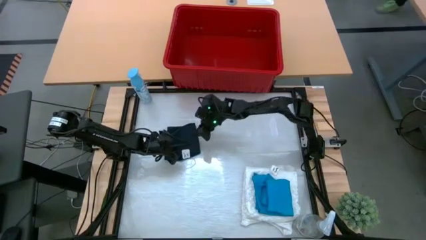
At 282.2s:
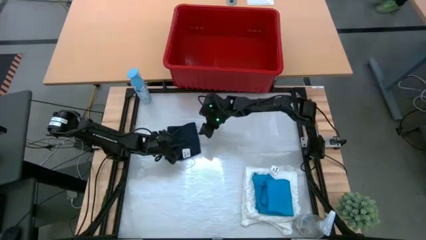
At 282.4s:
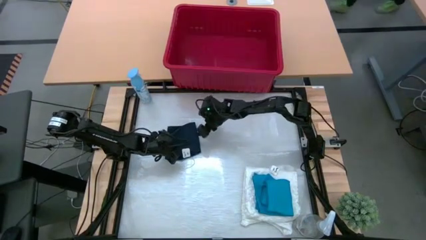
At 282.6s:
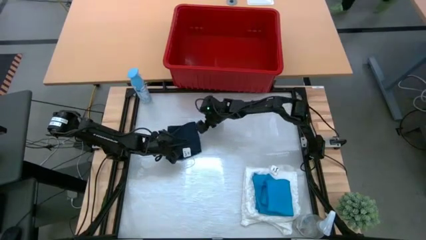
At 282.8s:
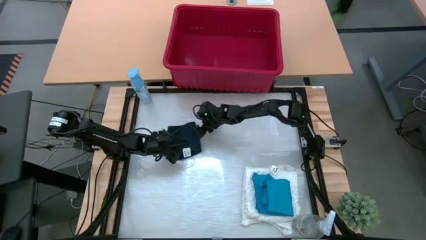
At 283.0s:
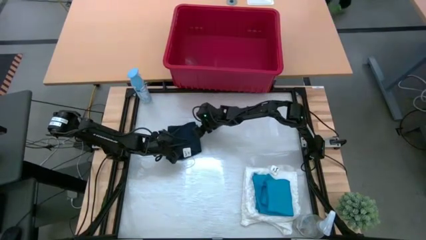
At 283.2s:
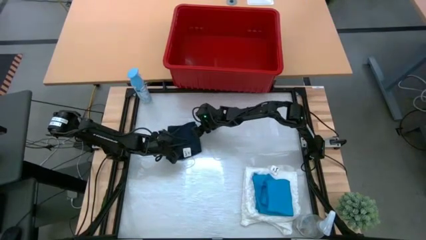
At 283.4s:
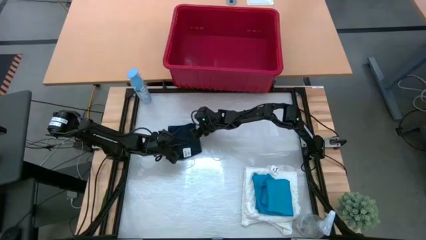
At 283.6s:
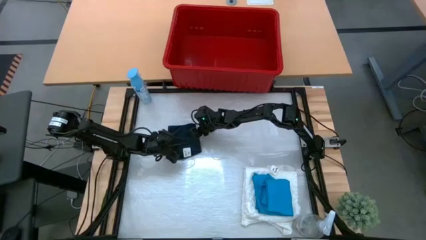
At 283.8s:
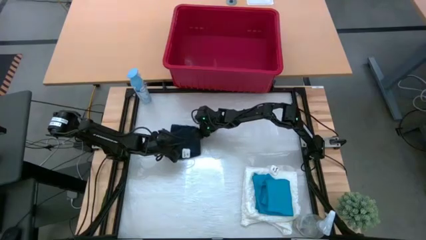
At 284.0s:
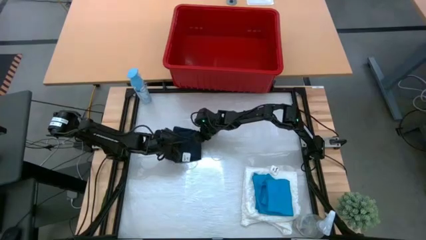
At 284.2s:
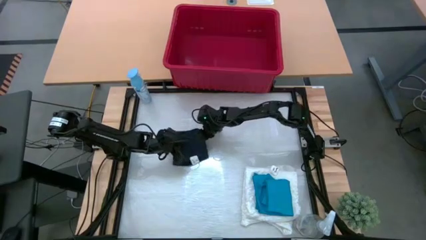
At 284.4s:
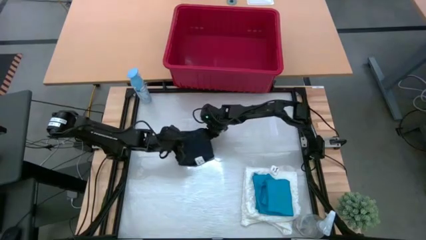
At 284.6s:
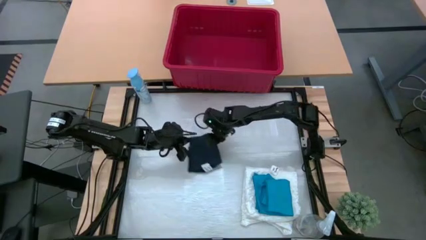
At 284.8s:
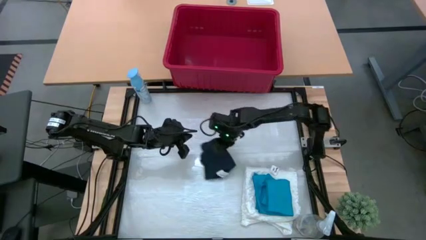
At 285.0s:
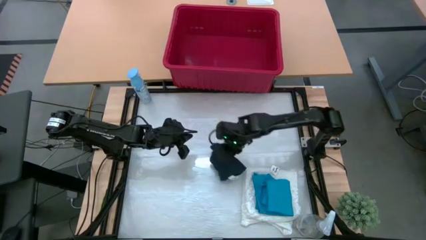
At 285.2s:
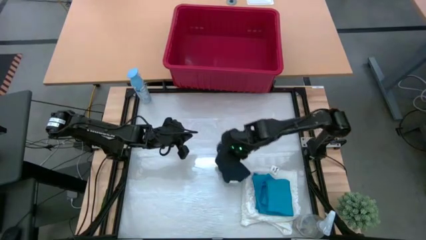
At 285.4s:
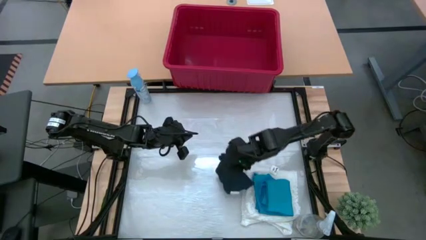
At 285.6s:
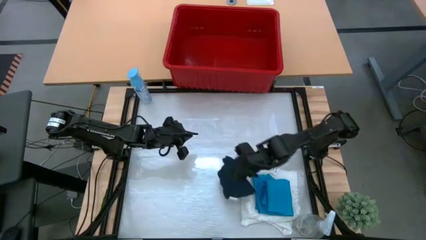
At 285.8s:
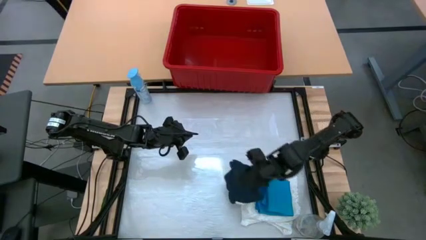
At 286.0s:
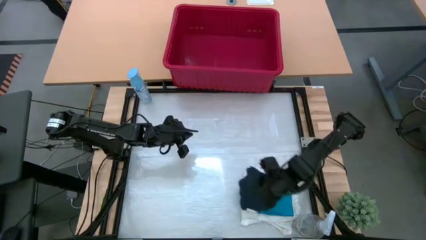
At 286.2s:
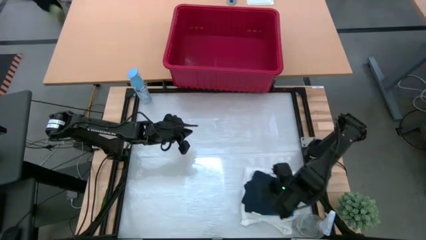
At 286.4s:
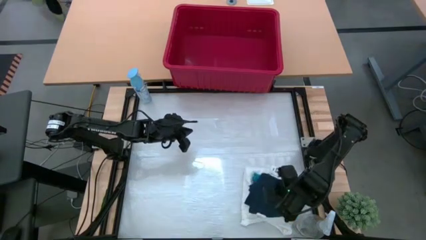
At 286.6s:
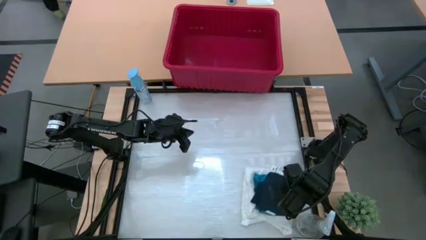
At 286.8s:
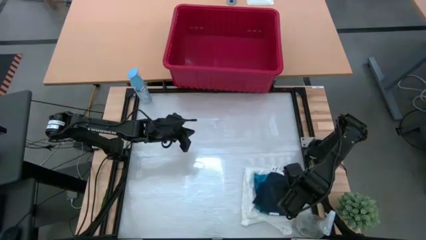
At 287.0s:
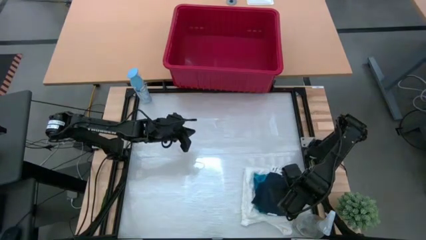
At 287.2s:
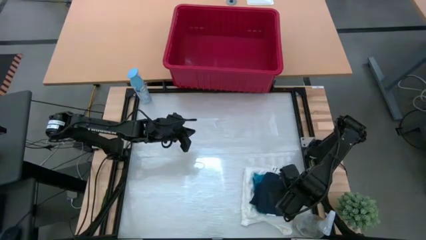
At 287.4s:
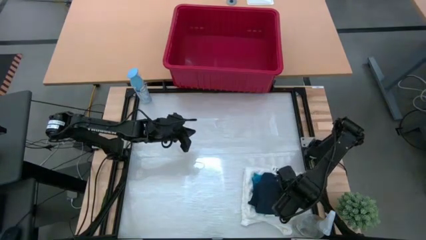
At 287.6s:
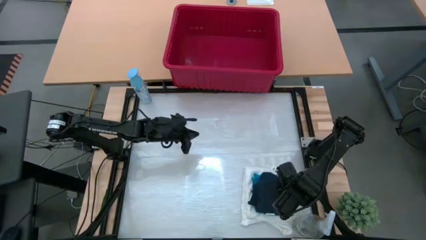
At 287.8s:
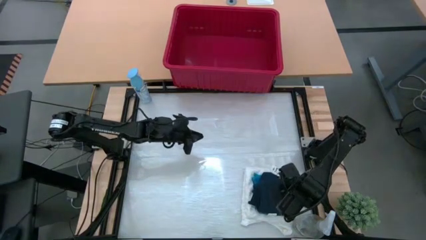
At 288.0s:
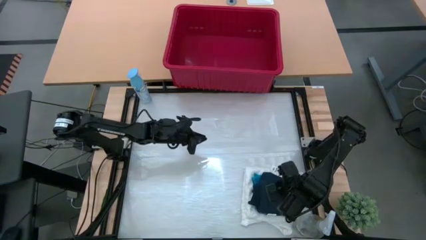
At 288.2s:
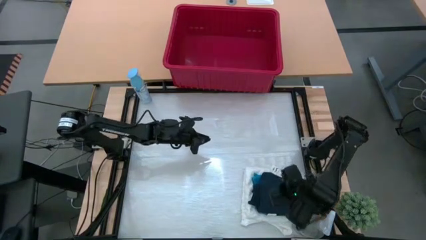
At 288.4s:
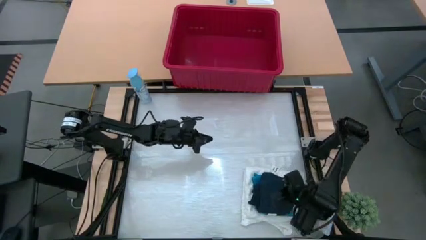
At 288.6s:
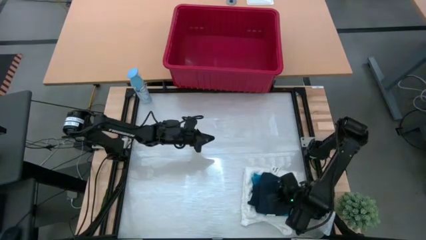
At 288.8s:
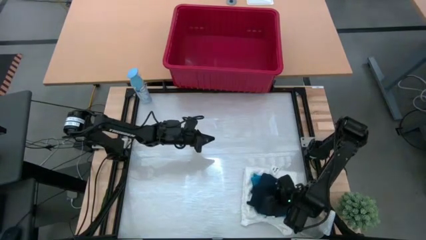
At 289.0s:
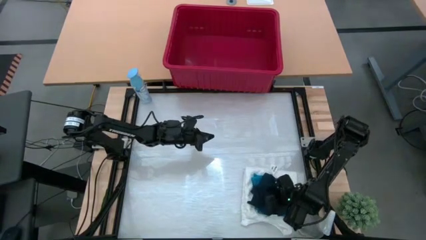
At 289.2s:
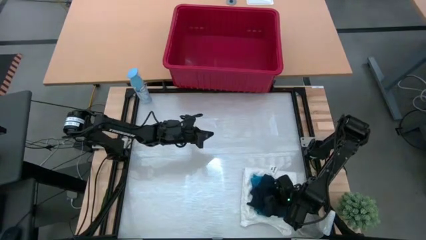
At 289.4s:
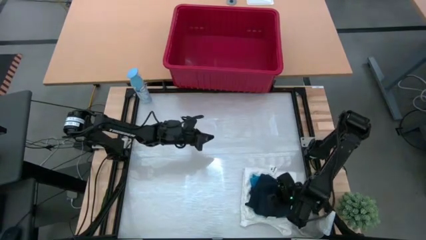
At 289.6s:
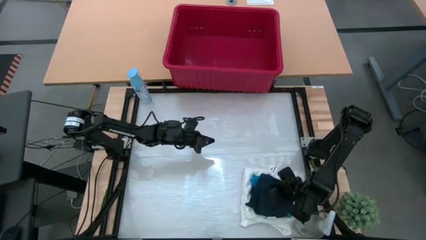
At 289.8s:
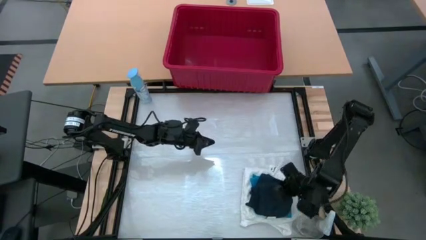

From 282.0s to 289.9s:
Task: Fold laundry
Stack the folded dark blue shorts on top of the folded blue shorts

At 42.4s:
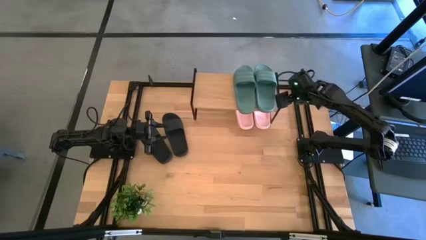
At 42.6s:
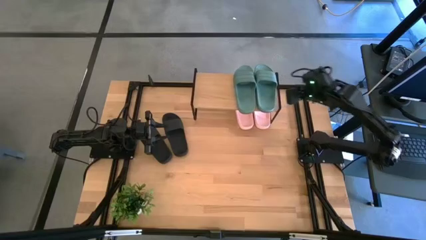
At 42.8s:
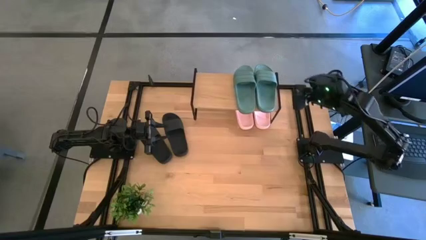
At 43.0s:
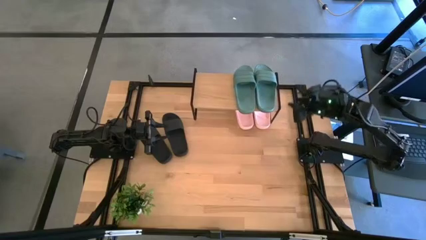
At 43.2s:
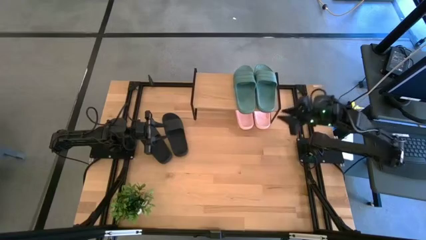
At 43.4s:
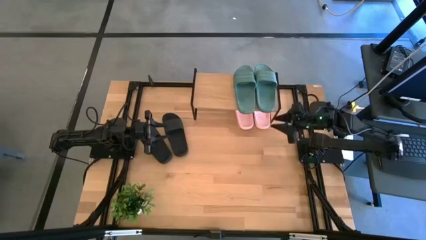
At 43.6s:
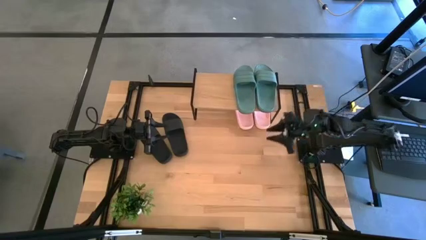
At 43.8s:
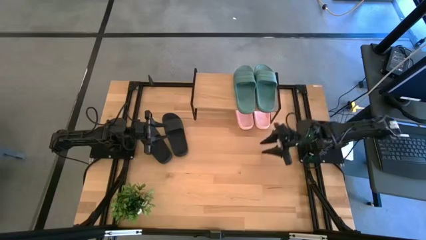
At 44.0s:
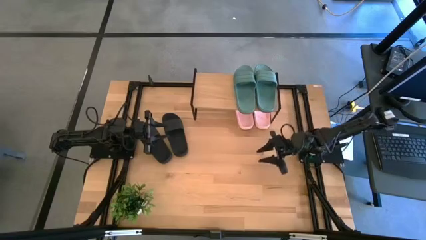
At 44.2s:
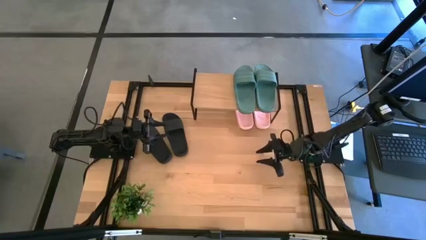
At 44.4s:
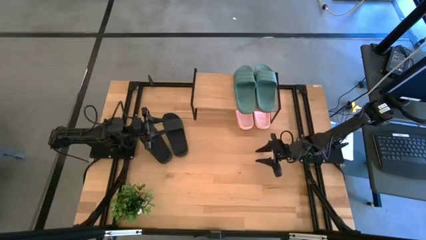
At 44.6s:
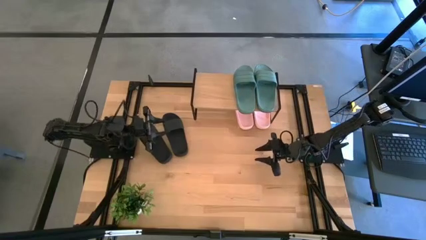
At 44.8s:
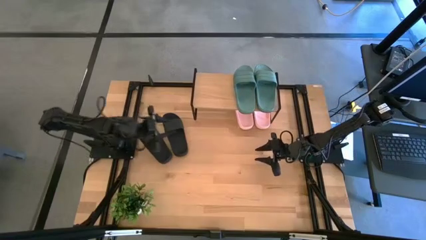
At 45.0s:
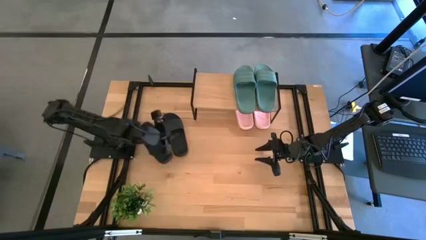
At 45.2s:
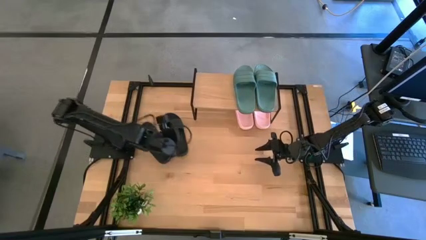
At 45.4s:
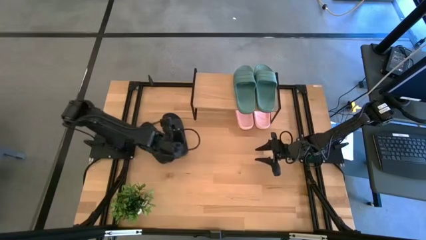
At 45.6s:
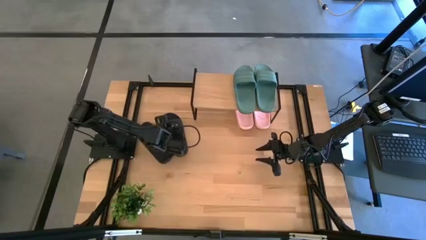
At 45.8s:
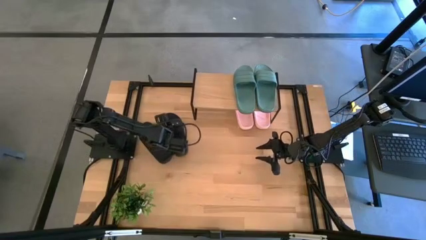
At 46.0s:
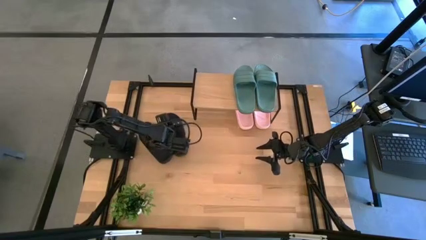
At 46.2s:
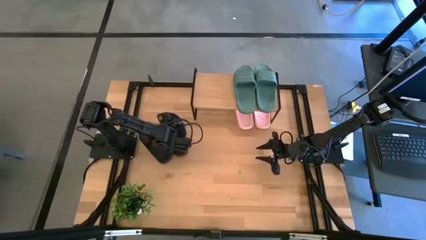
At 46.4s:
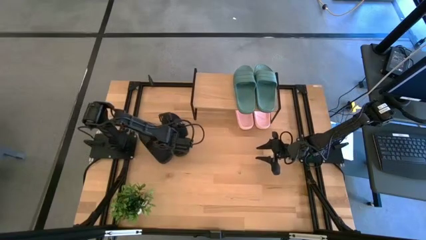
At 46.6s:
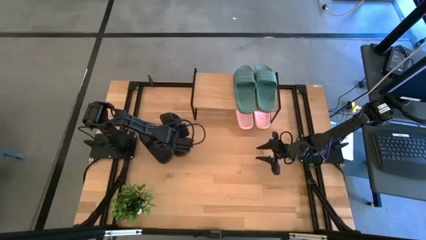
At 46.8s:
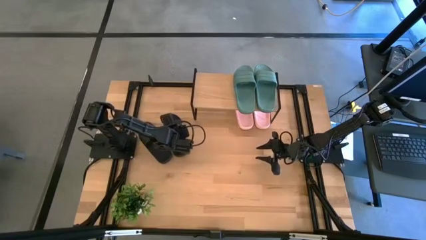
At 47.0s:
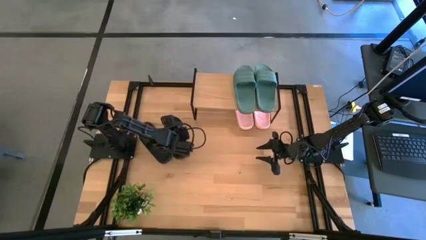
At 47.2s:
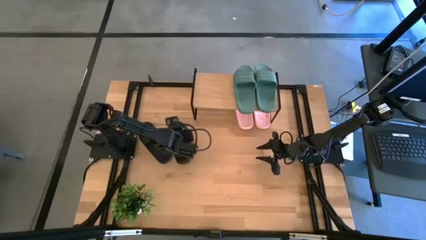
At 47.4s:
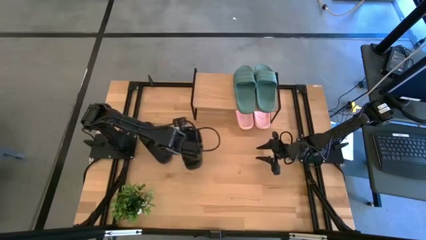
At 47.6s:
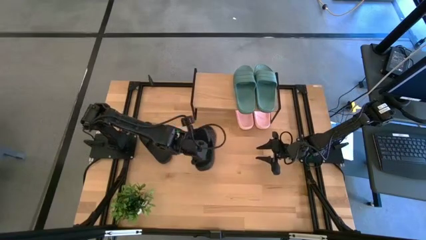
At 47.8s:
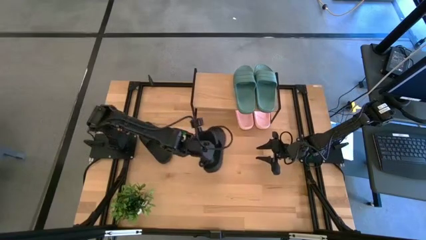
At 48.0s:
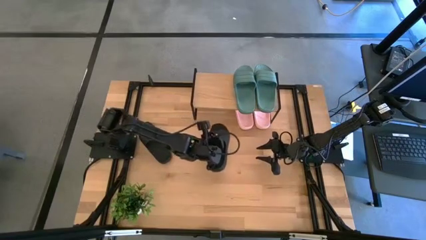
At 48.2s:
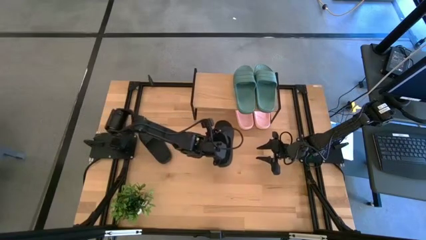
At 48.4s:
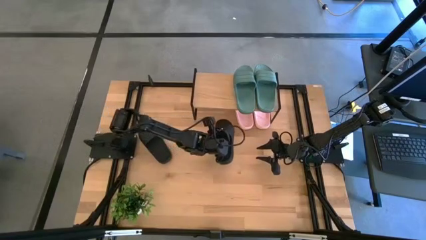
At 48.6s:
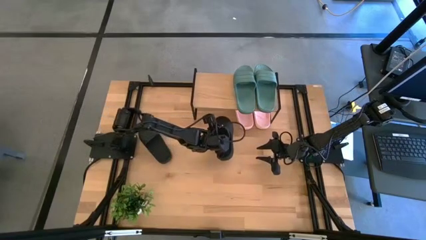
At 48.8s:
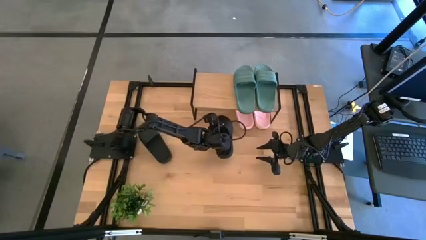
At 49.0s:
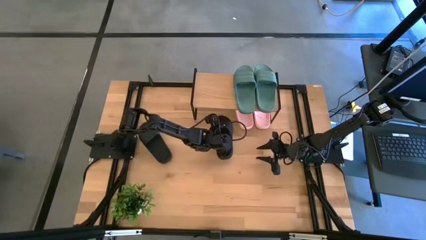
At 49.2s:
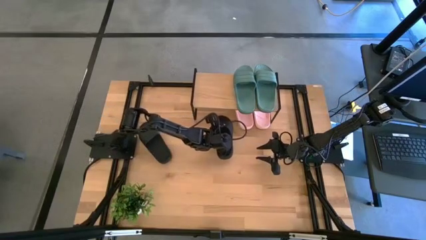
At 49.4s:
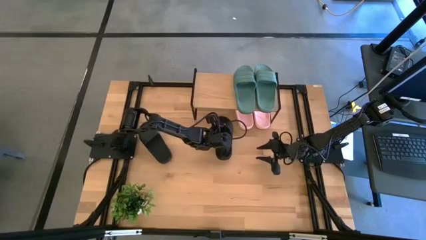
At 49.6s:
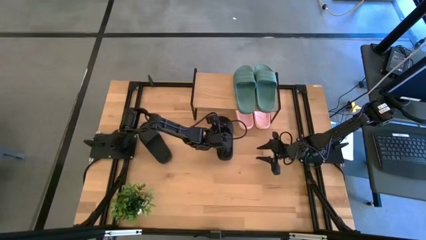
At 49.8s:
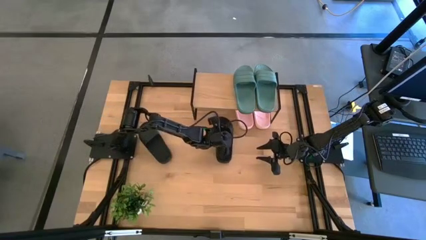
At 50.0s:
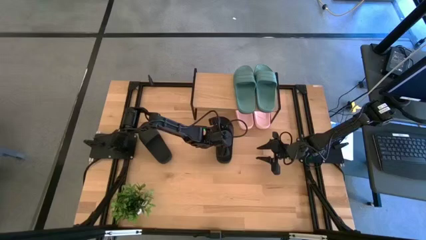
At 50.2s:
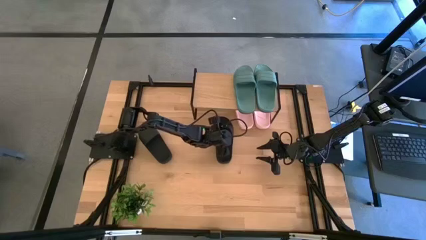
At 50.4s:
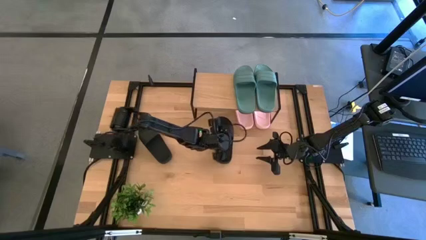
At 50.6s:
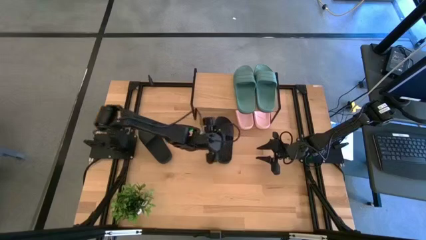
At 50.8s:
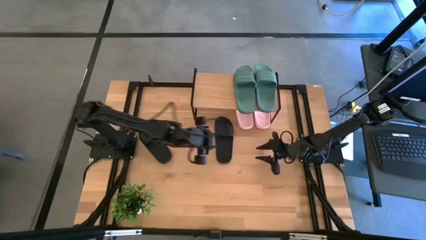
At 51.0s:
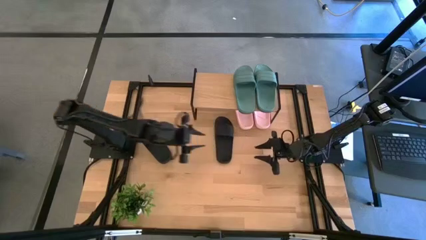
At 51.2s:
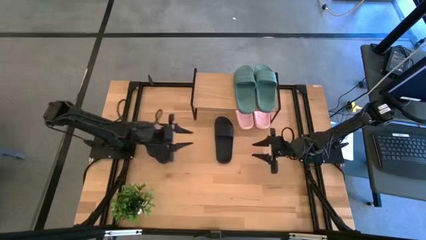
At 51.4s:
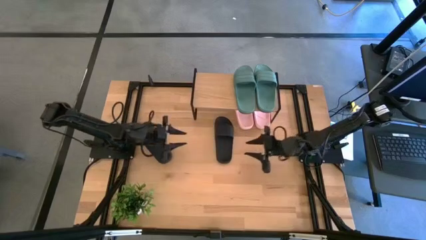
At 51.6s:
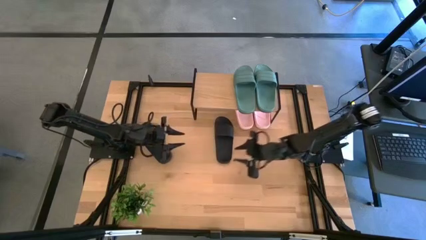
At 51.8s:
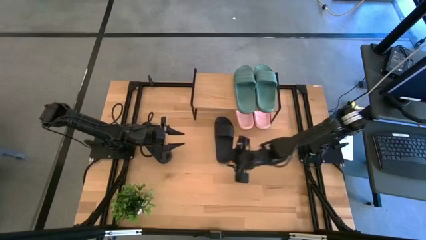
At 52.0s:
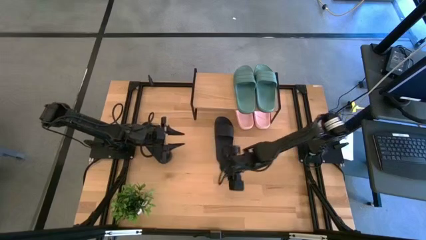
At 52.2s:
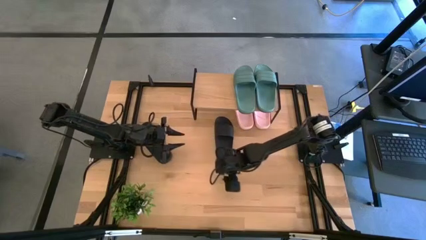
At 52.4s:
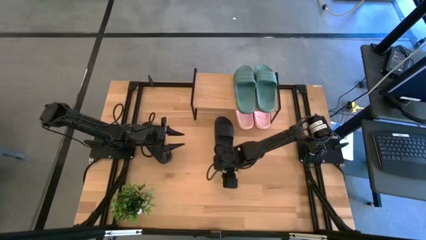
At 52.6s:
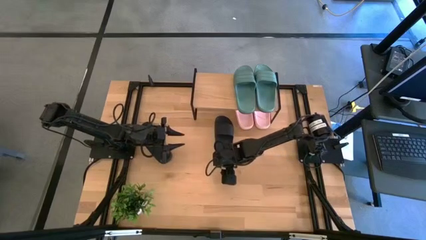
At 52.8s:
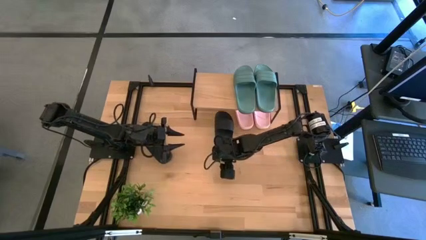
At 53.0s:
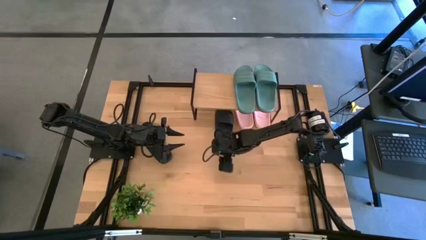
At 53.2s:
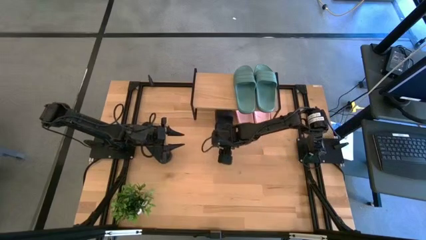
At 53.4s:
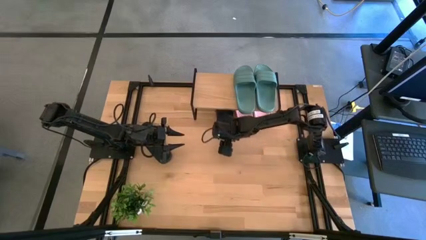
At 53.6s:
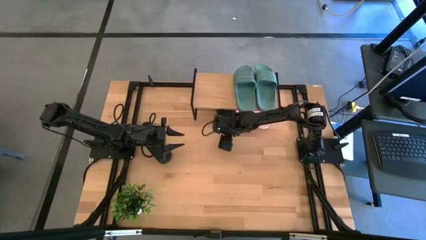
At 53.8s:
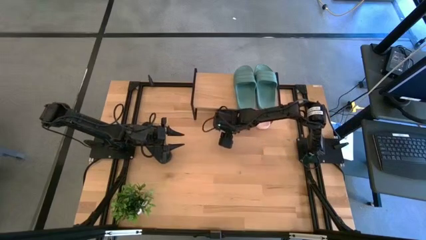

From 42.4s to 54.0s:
Task: Pick and place slides into the shelf
Put the right black slide under the shelf
